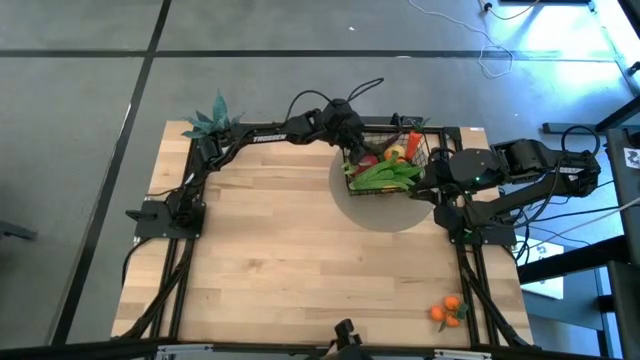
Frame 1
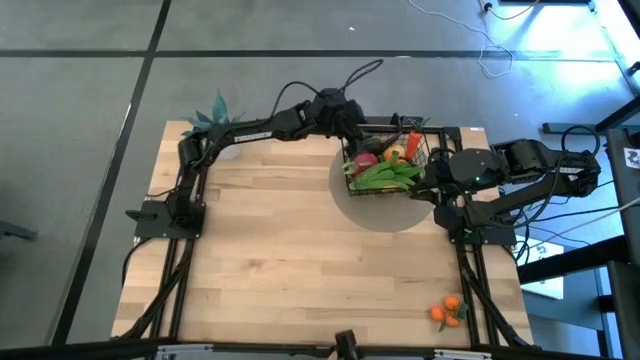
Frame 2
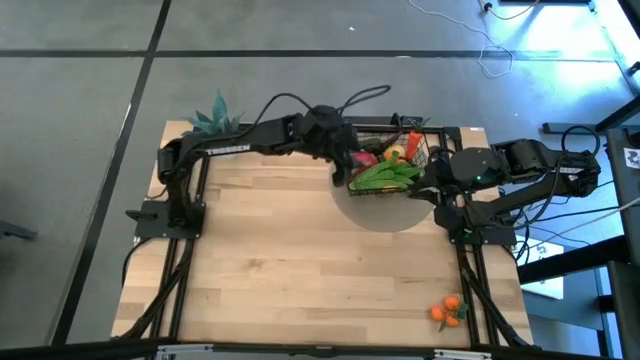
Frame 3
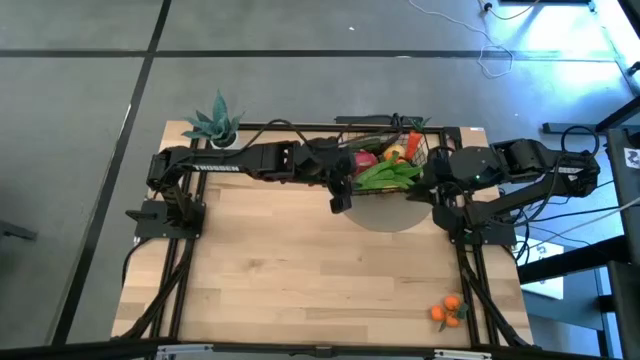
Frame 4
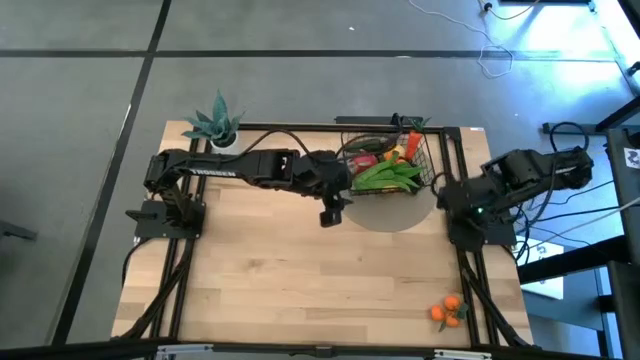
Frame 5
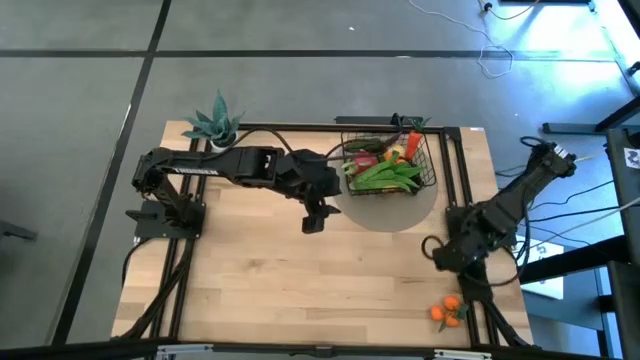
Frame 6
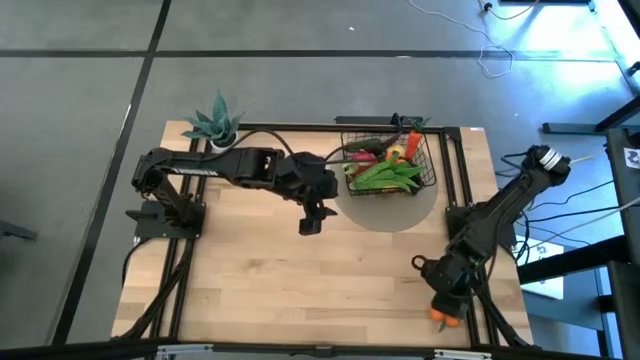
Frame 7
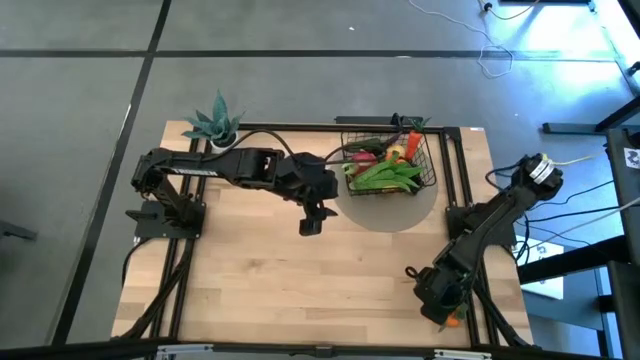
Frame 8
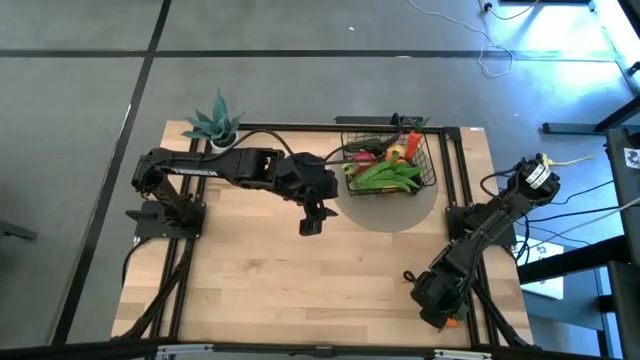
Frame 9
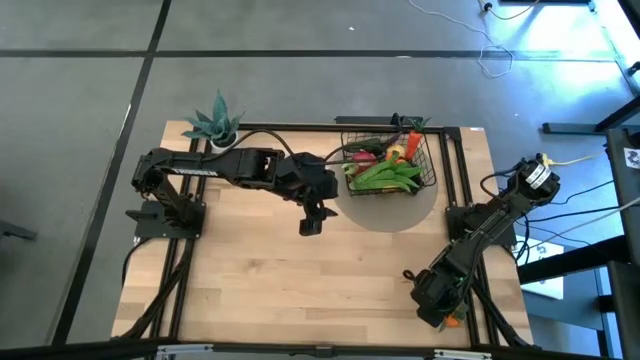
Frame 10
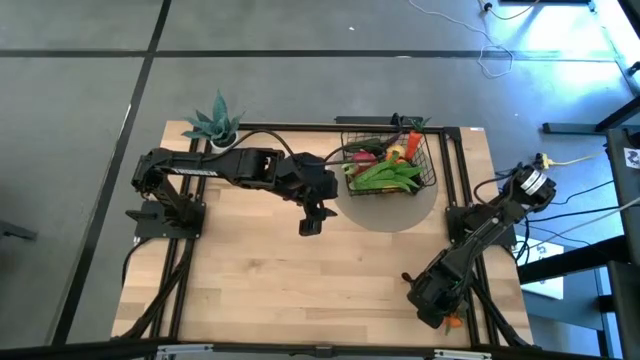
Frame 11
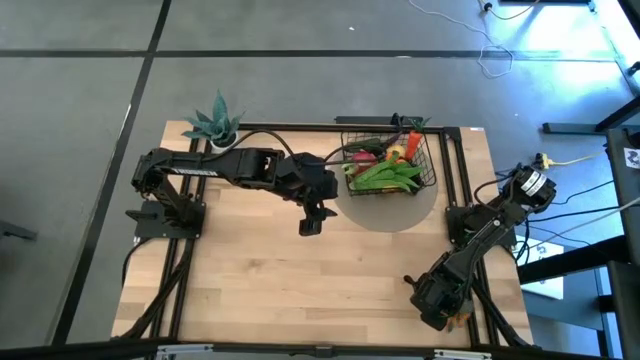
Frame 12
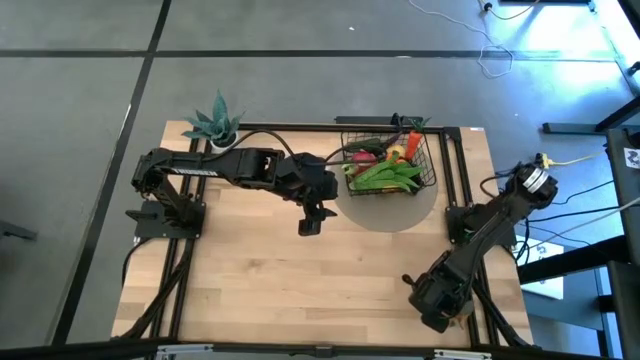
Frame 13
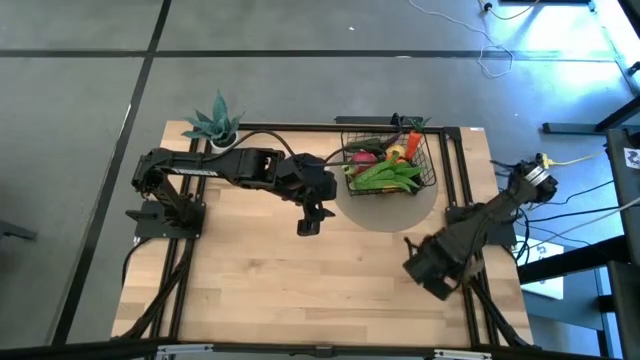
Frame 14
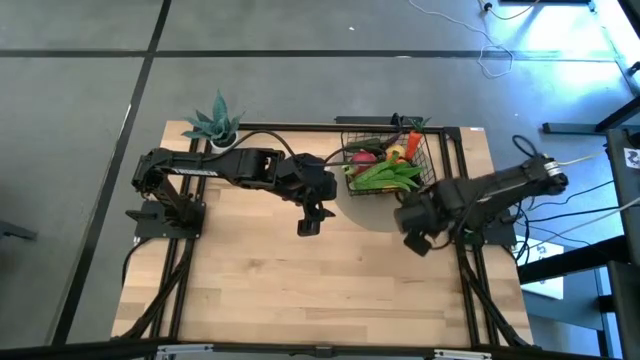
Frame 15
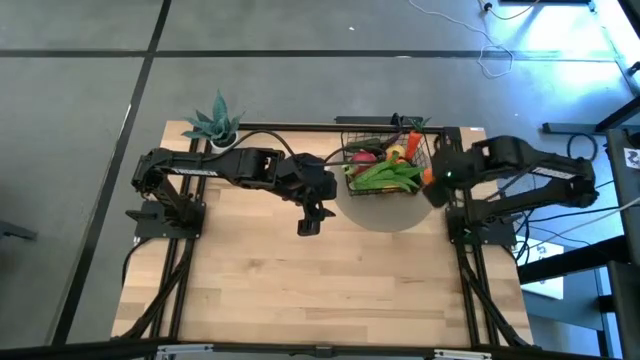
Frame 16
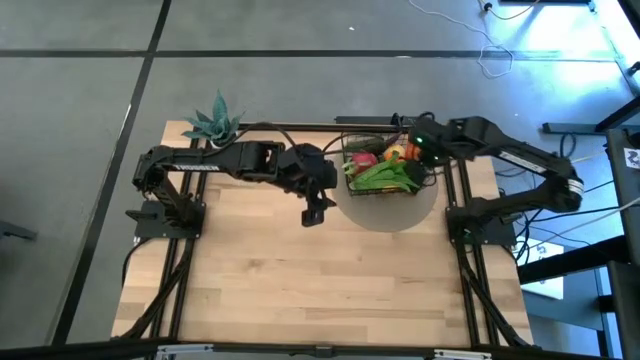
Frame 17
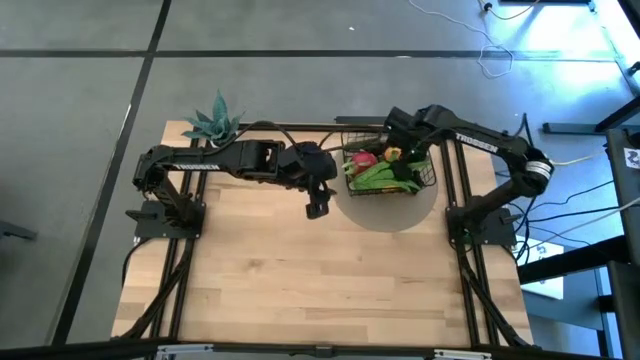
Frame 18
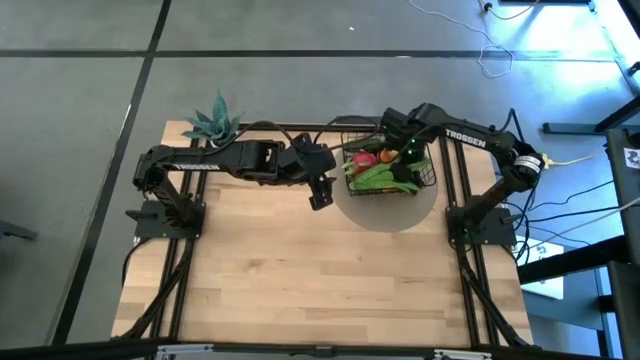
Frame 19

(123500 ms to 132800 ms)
Task: Build produce basket
Put the tangerines into the black wire basket

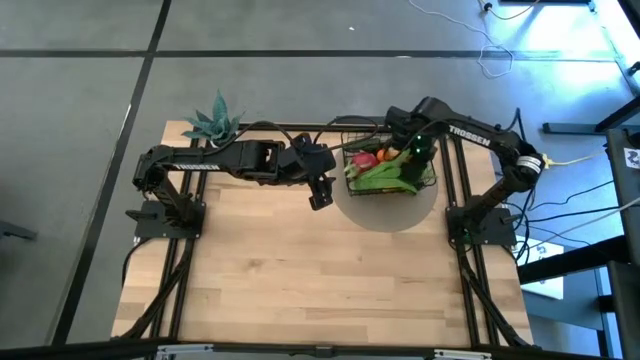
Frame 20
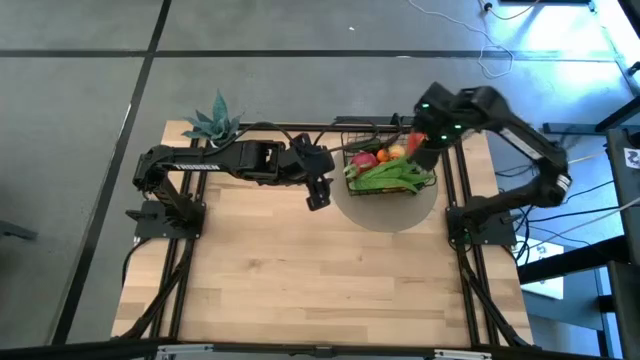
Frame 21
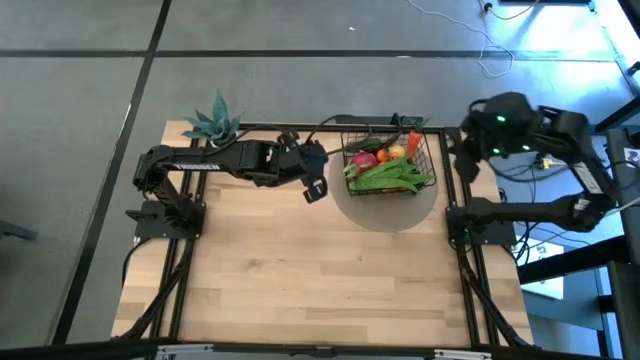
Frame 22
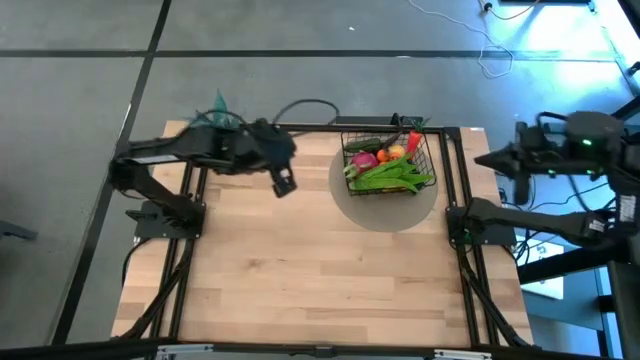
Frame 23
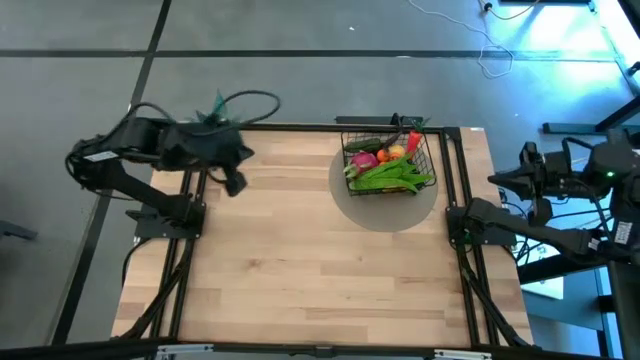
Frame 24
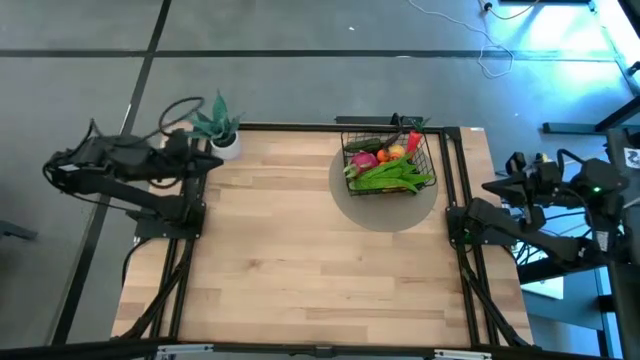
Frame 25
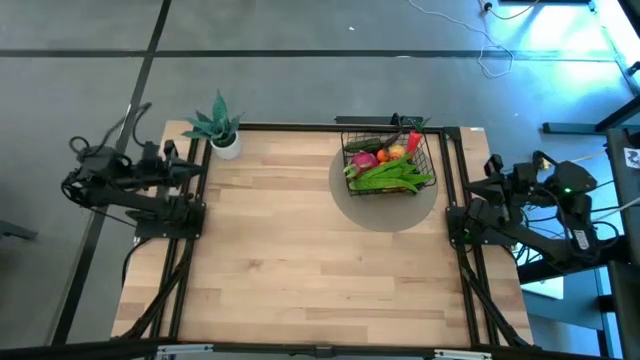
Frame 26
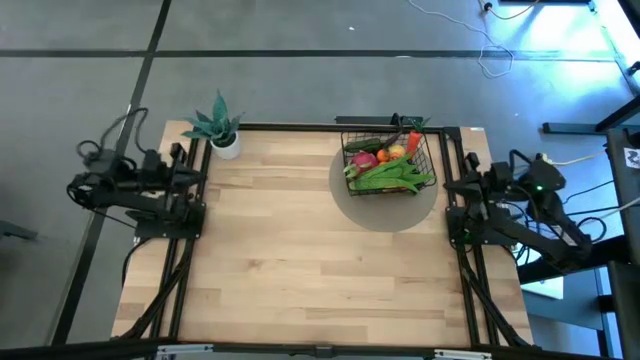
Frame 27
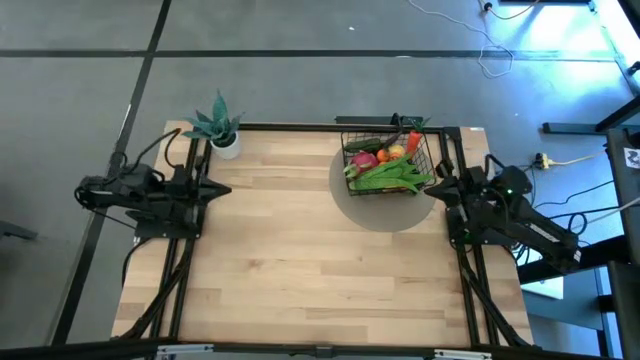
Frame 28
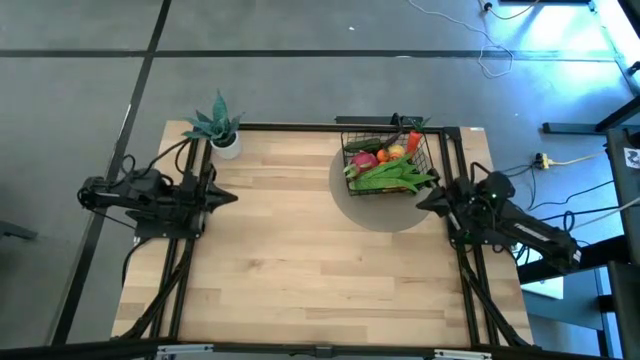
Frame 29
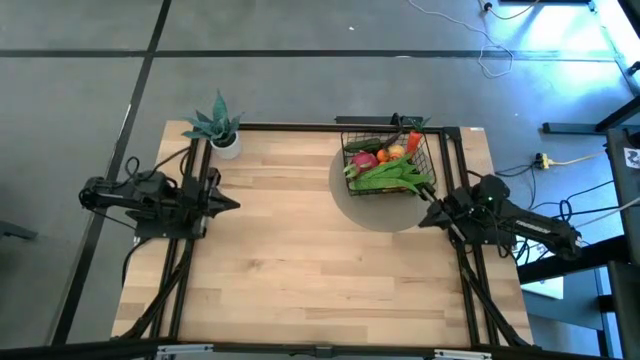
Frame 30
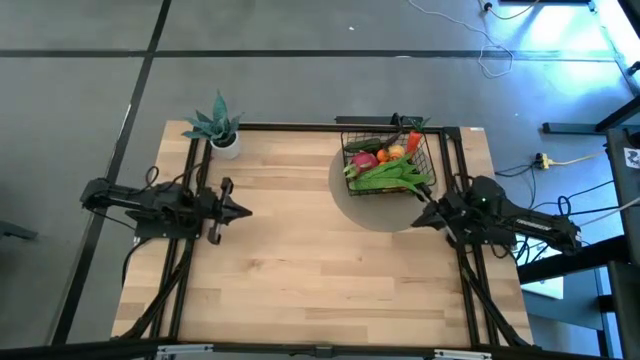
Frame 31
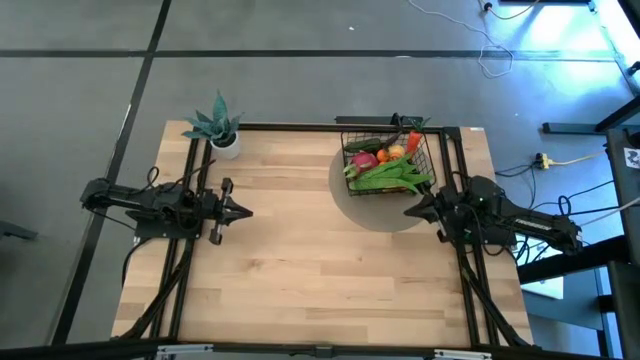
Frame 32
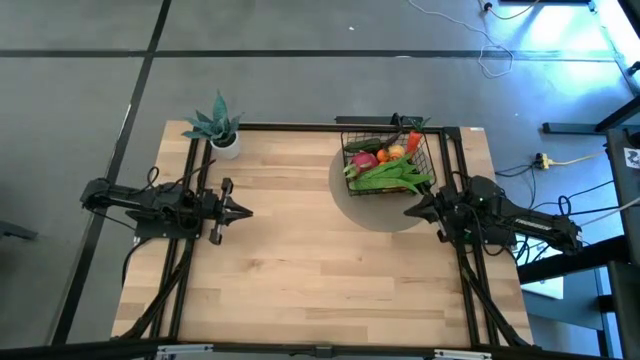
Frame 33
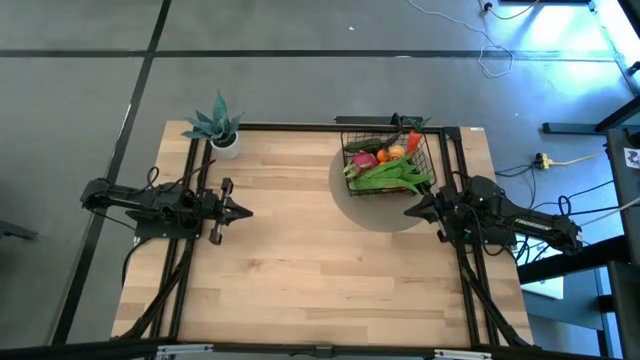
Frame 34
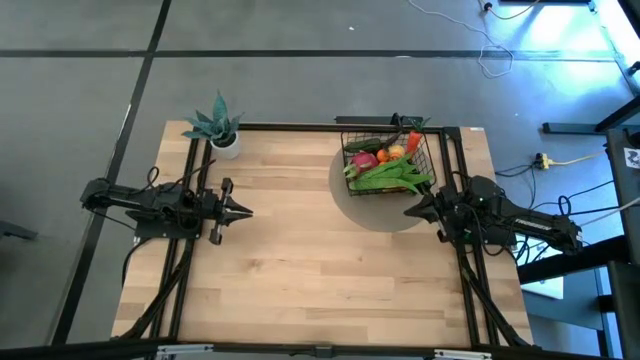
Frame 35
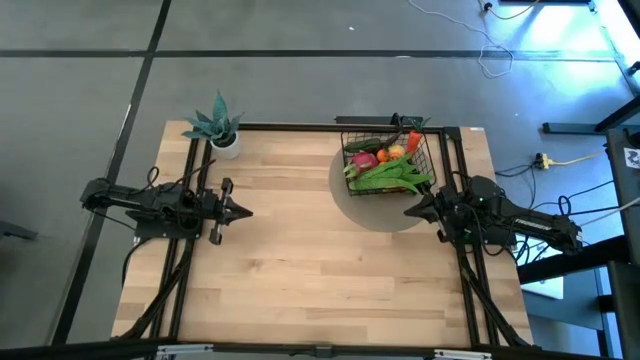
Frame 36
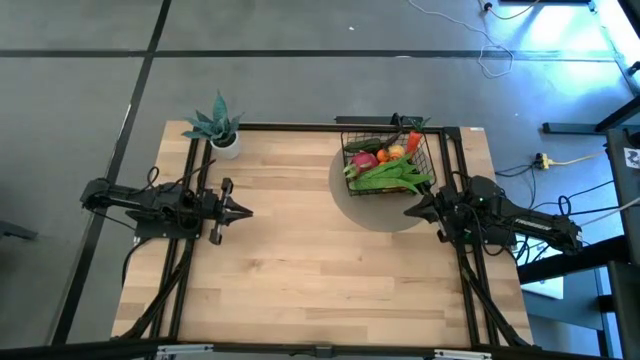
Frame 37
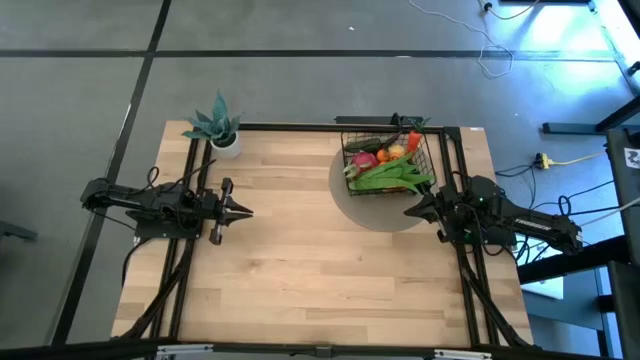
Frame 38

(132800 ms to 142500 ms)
Return to Home Position

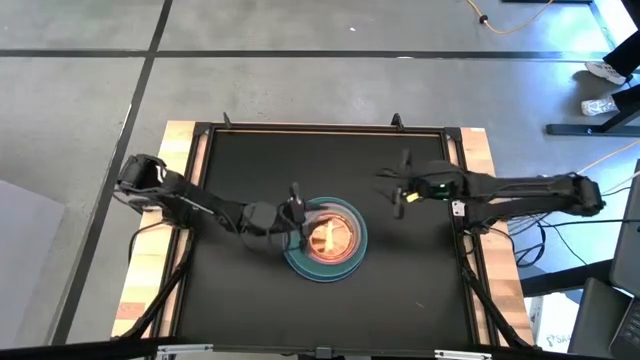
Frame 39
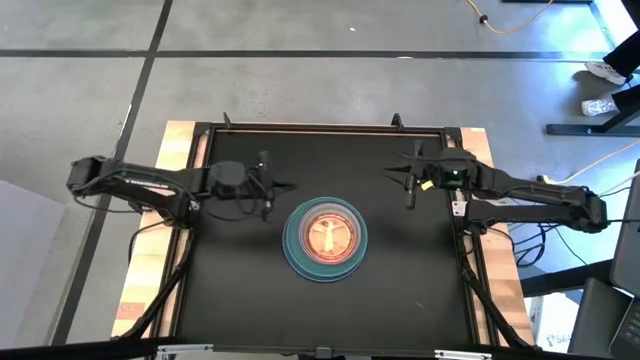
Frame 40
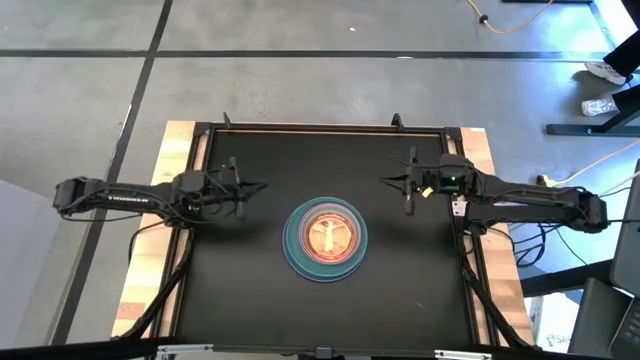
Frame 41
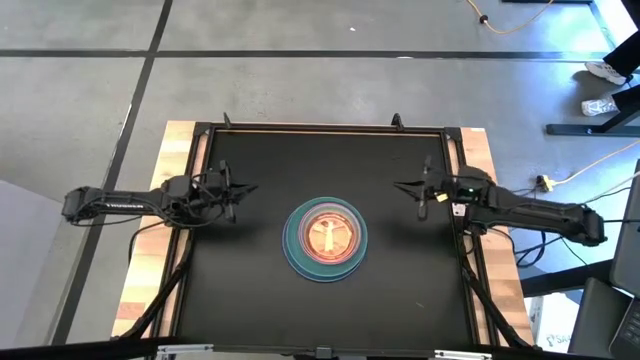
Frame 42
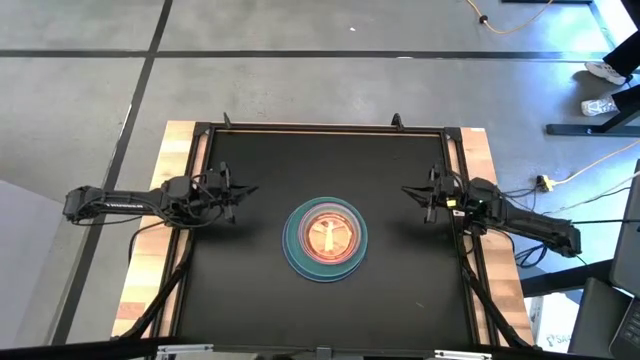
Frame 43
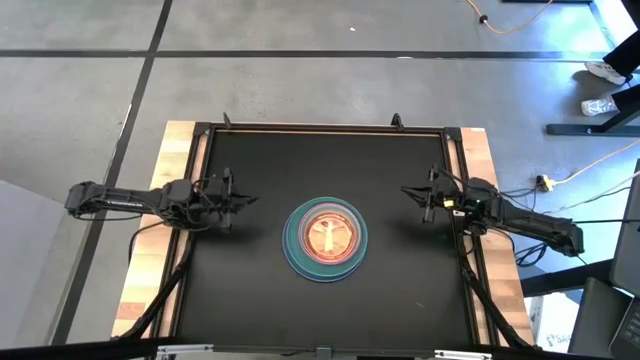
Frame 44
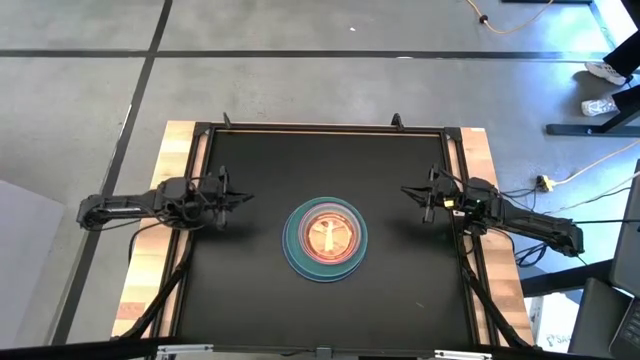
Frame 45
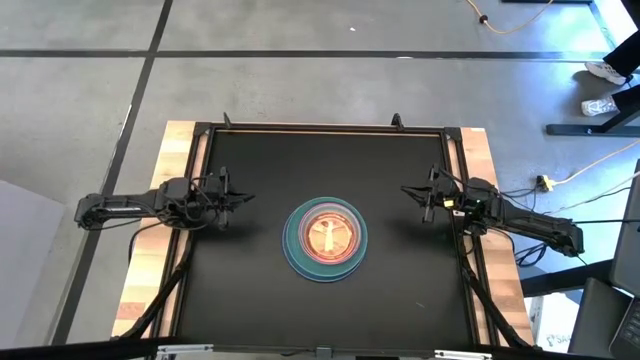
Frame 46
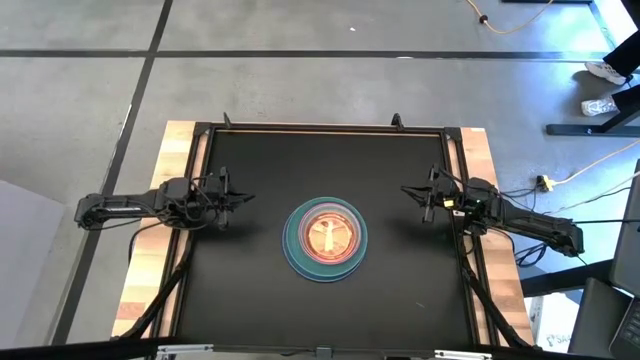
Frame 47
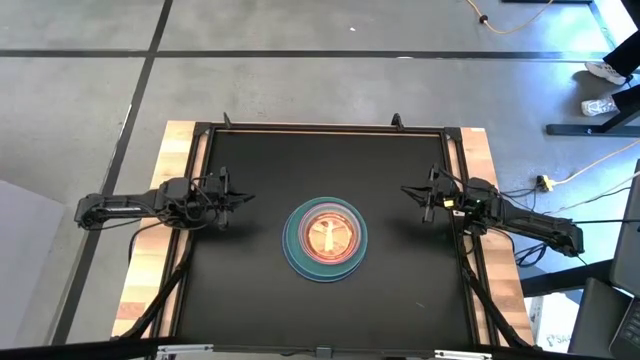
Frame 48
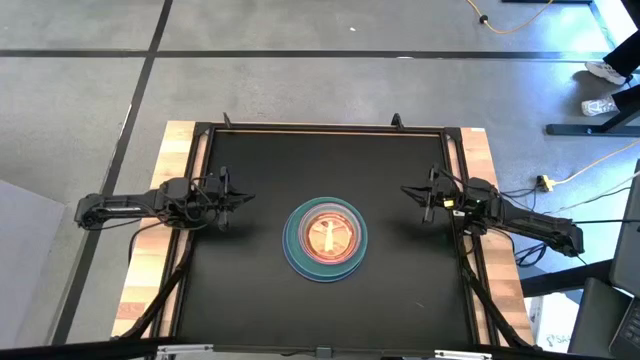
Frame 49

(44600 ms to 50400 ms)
Task: Stack plastic plates
Return to Home Position
